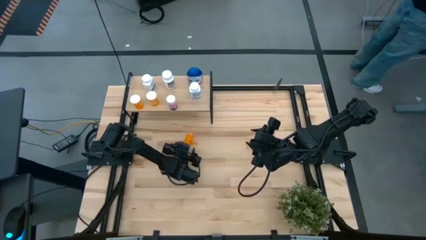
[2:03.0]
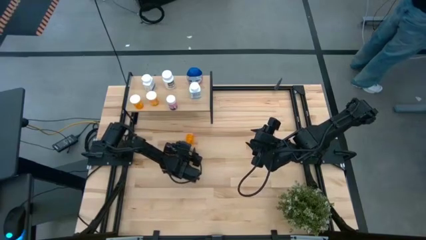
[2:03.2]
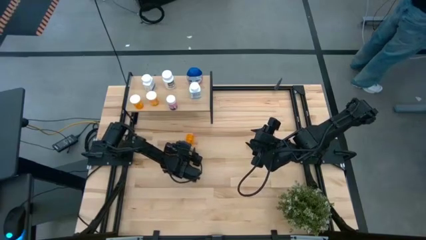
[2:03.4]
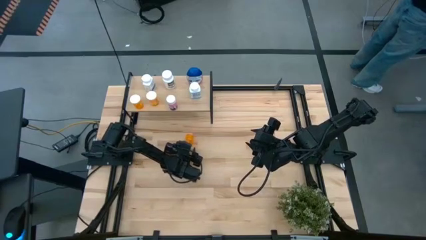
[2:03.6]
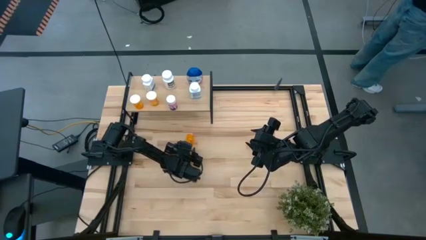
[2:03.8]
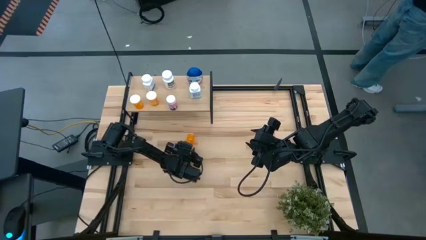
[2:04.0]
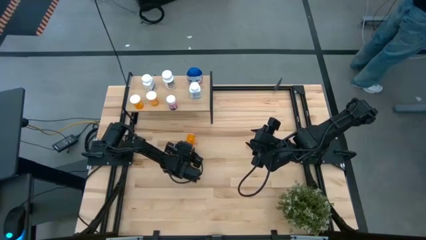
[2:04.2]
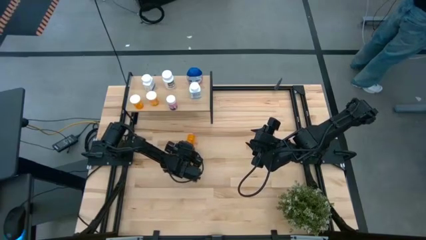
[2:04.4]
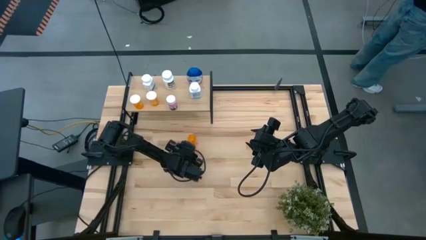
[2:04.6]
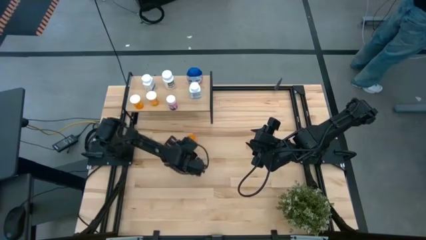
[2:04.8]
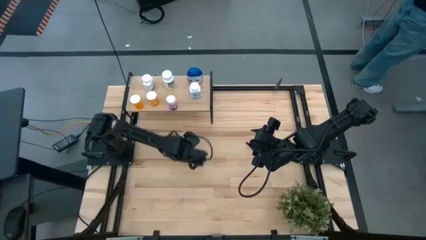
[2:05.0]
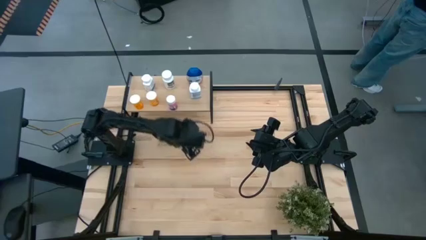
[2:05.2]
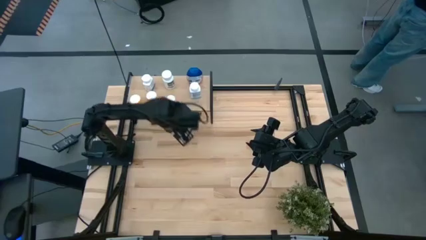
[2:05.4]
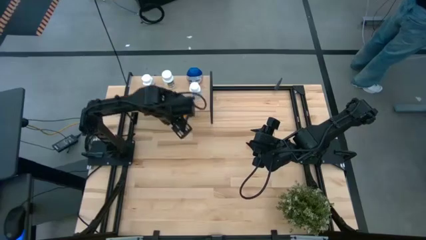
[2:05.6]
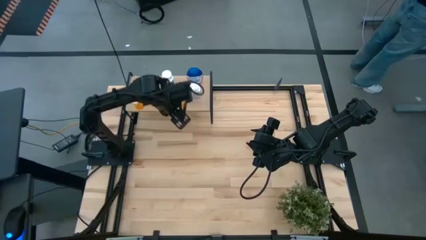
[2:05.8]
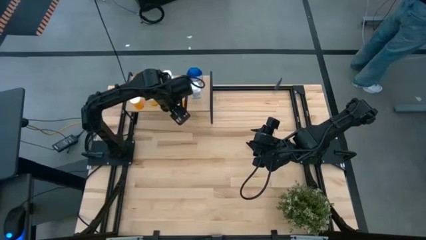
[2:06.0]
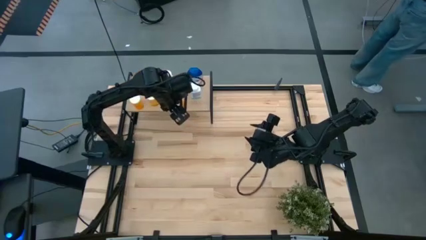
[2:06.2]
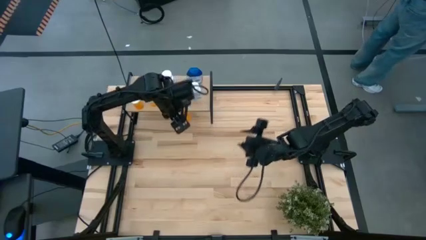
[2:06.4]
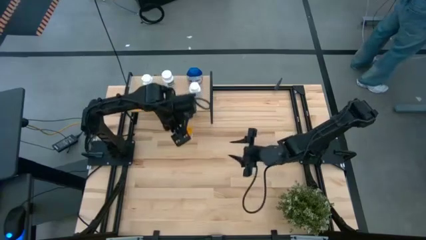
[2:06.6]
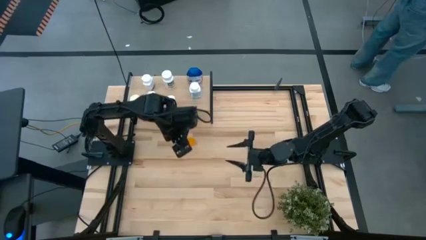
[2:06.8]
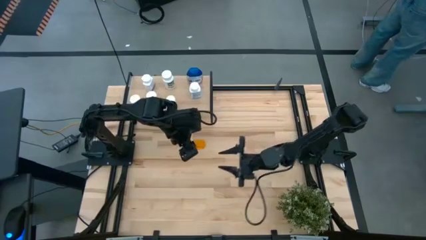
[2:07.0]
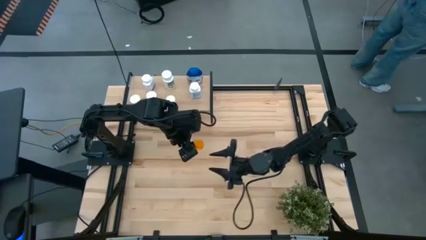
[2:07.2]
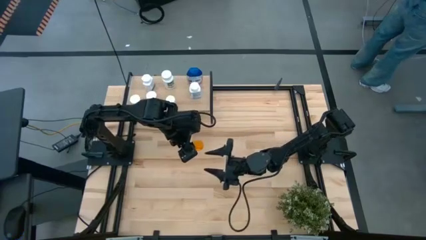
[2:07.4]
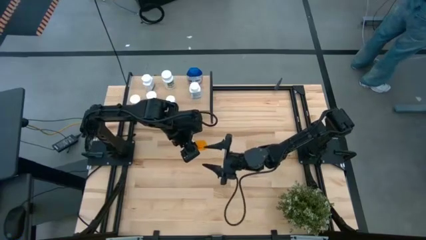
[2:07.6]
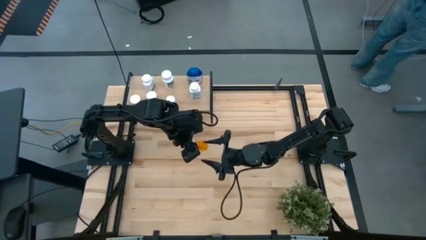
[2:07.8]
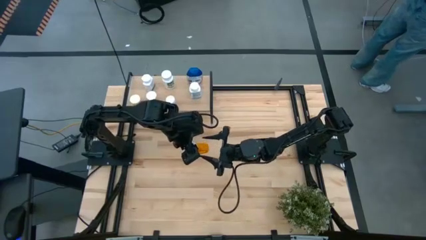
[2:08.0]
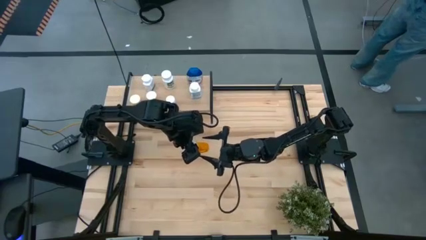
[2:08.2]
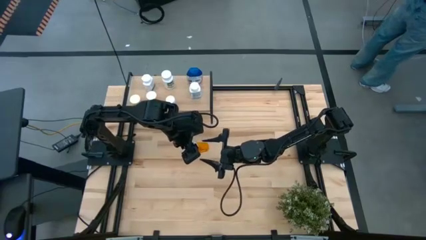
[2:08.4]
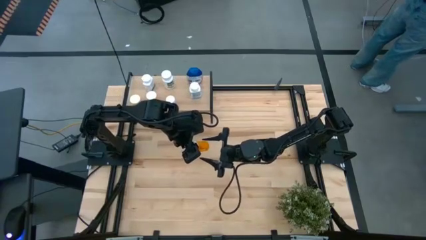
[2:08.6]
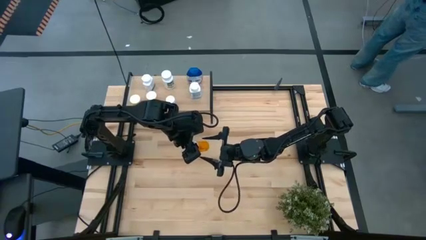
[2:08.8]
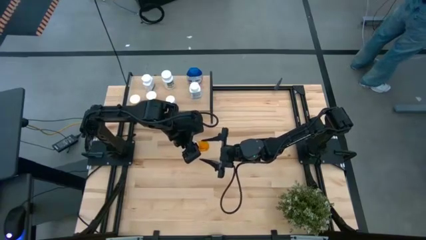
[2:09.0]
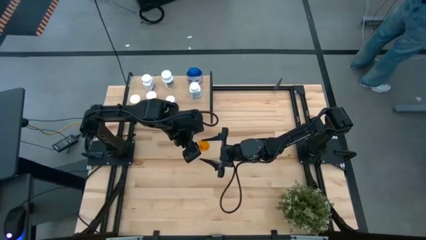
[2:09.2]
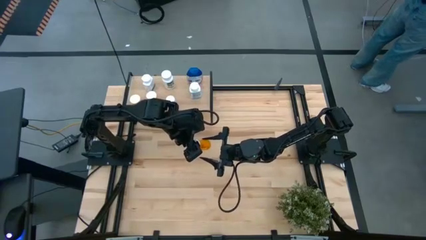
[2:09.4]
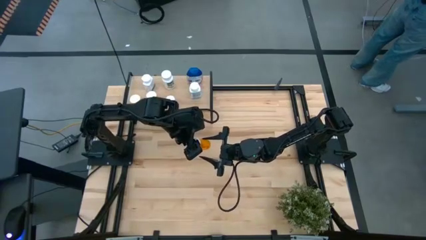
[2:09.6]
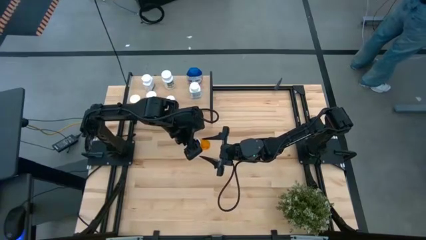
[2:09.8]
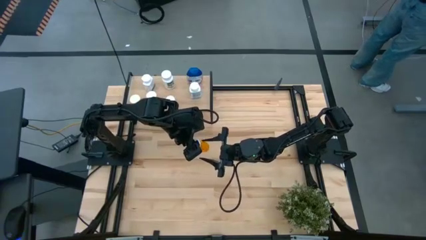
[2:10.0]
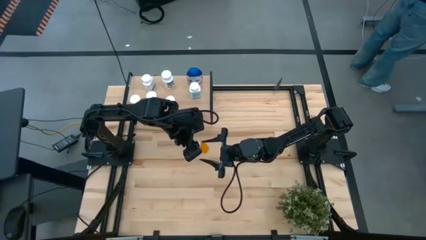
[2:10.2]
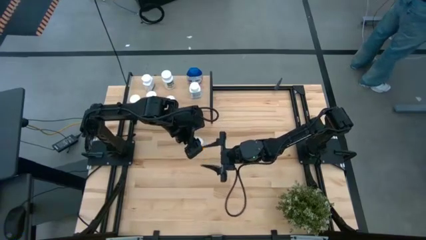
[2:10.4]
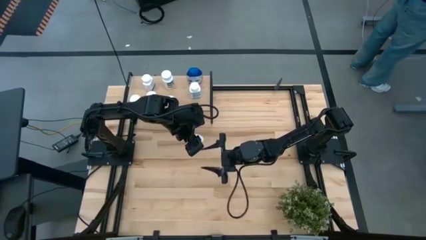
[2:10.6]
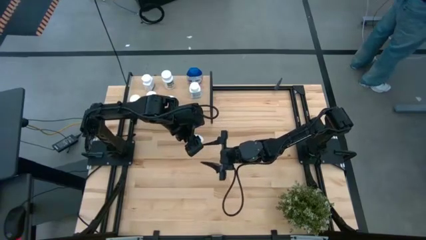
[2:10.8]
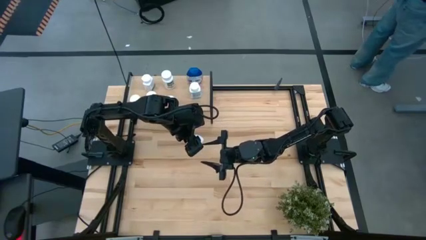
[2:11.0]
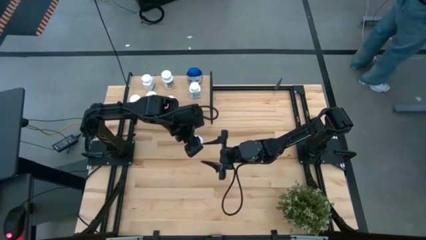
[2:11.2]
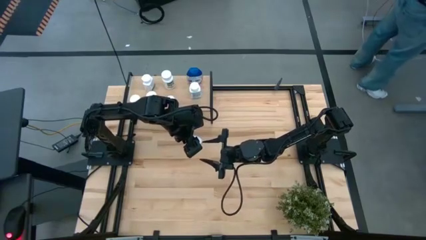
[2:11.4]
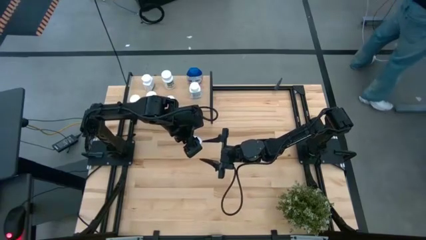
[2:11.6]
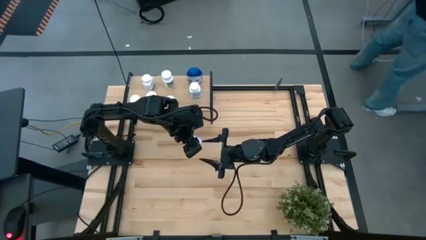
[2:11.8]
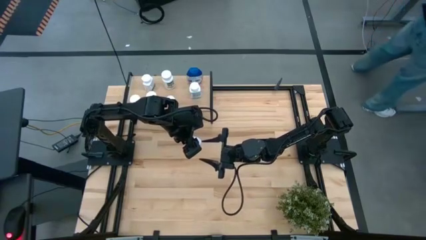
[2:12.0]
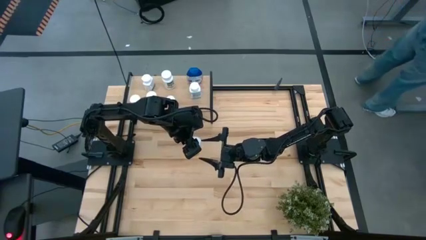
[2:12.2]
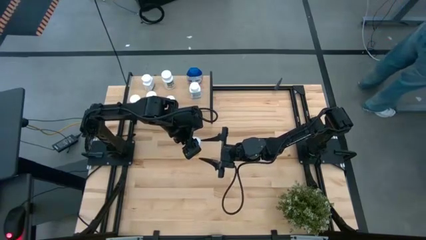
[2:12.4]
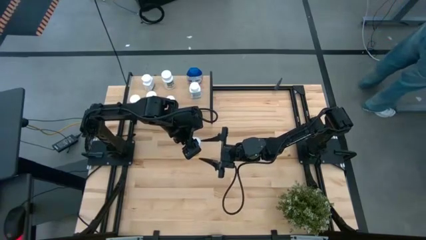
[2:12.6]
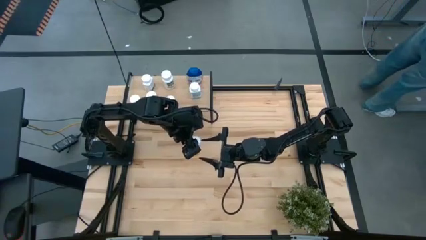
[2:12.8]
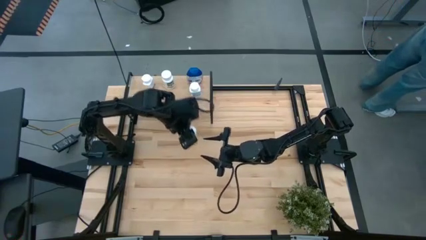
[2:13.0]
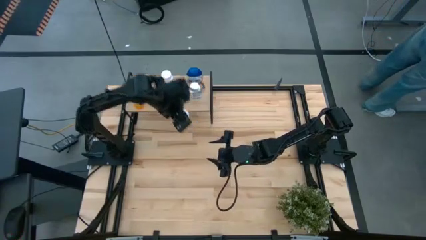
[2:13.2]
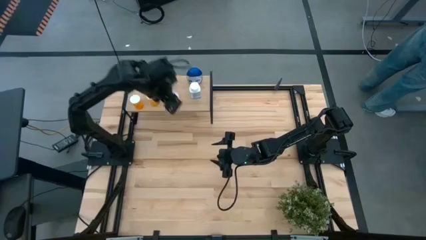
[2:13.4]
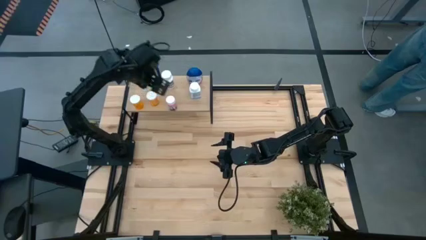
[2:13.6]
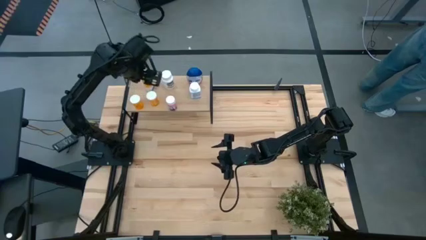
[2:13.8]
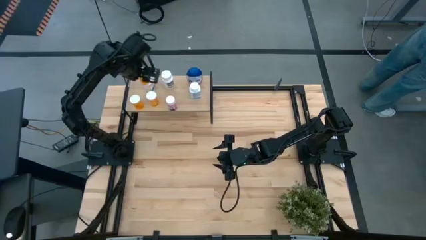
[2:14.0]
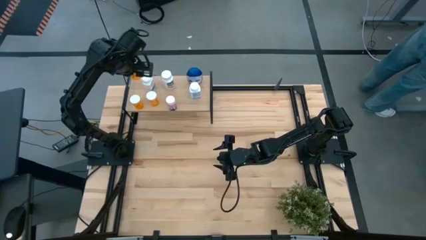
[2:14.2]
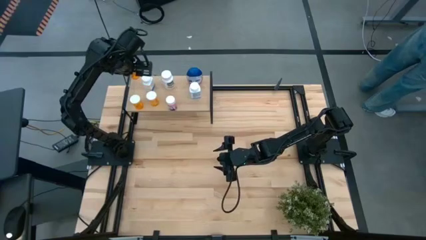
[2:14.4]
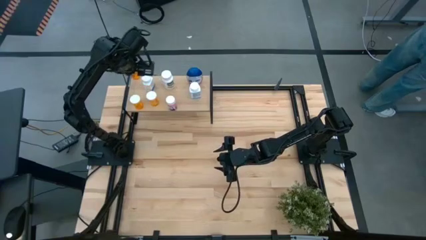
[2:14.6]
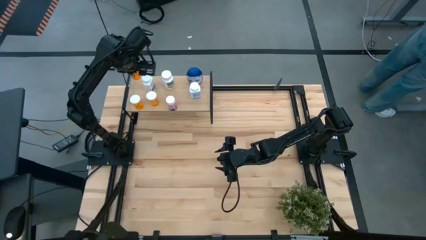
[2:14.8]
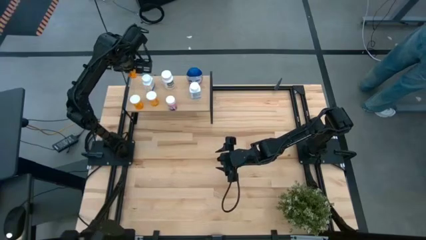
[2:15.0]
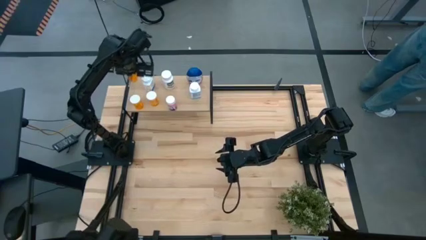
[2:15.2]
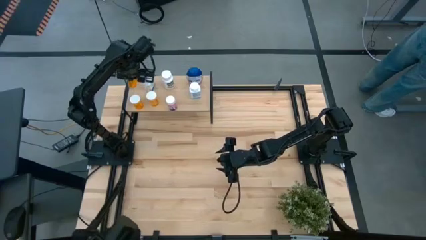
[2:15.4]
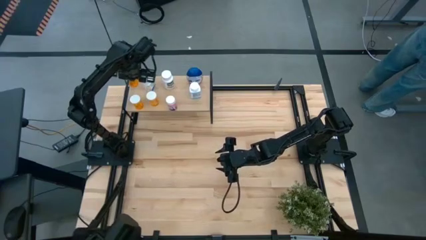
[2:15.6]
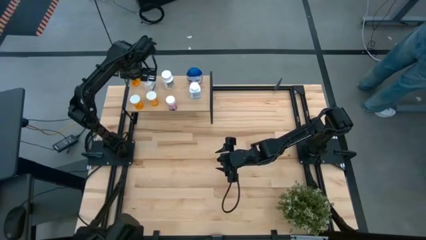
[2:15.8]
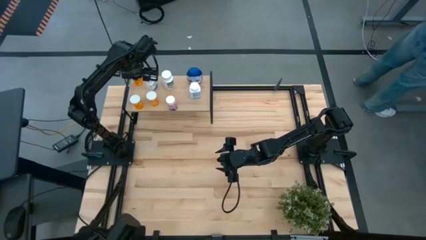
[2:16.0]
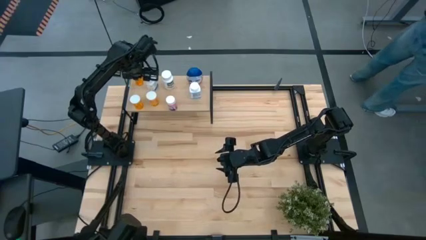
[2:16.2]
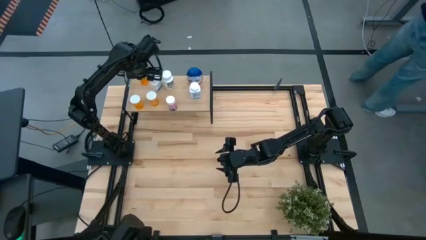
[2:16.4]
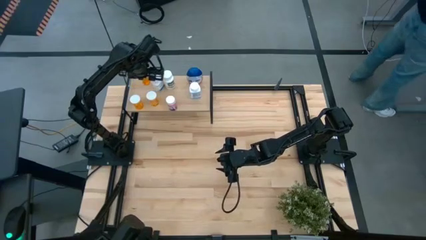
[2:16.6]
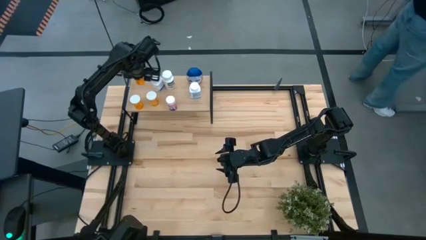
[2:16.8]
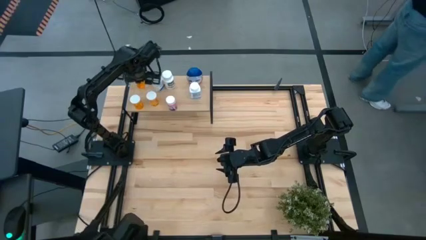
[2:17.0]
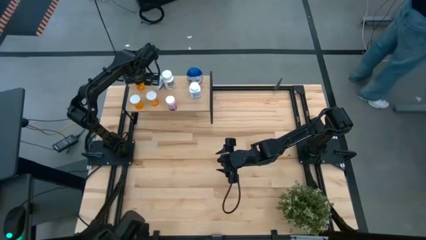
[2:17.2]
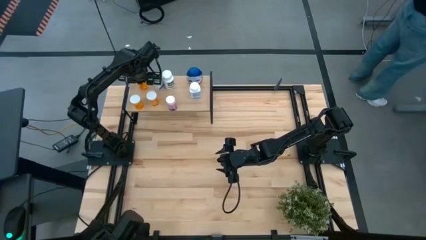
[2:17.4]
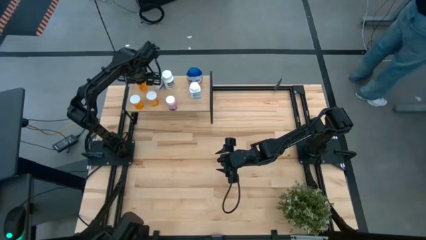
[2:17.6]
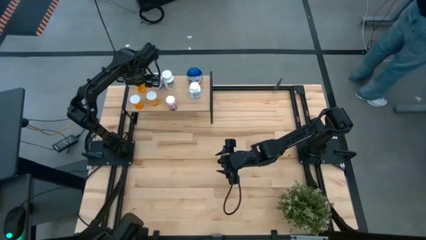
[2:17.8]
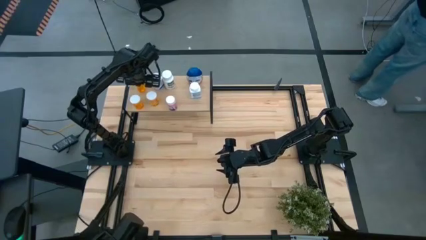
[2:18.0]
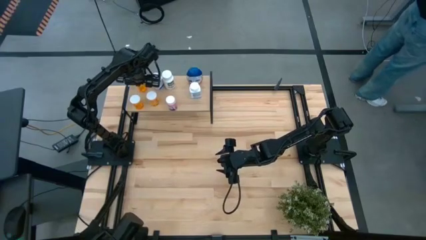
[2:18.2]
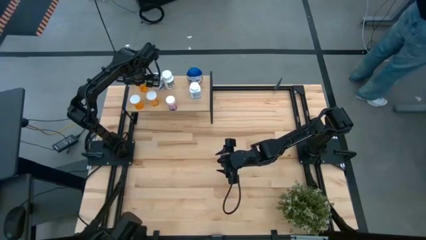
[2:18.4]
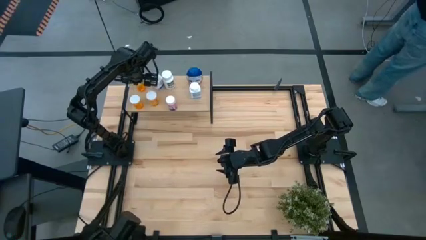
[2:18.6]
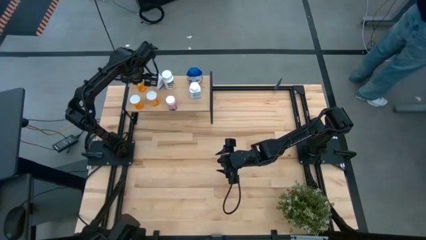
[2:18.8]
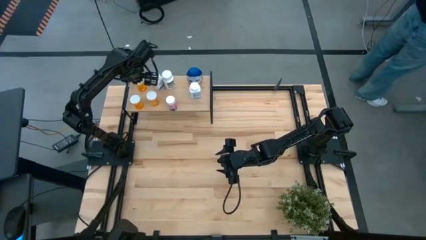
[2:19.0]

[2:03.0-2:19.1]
Task: Pick and place medicine bottles onto shelf by color
Put the orange pill bottle on the shelf
